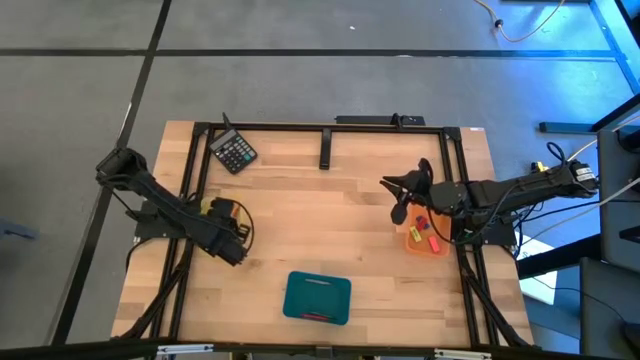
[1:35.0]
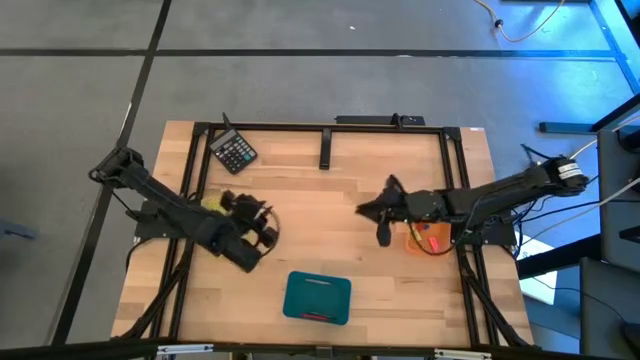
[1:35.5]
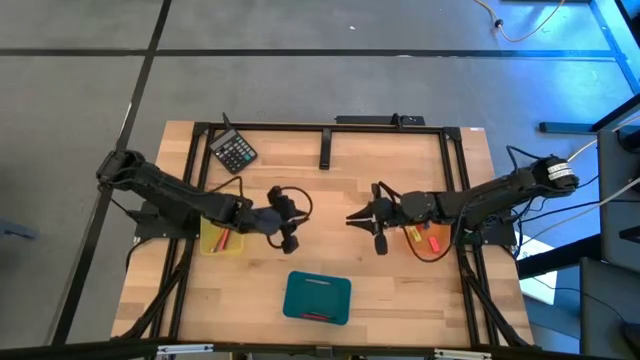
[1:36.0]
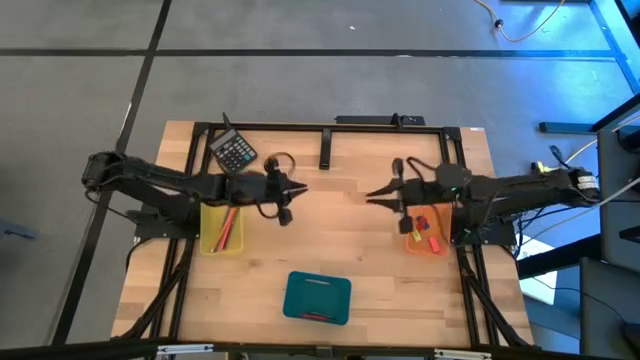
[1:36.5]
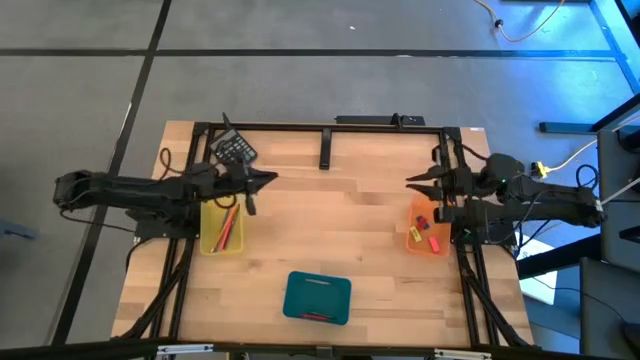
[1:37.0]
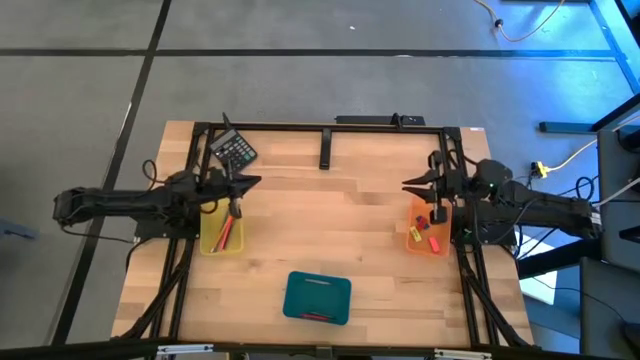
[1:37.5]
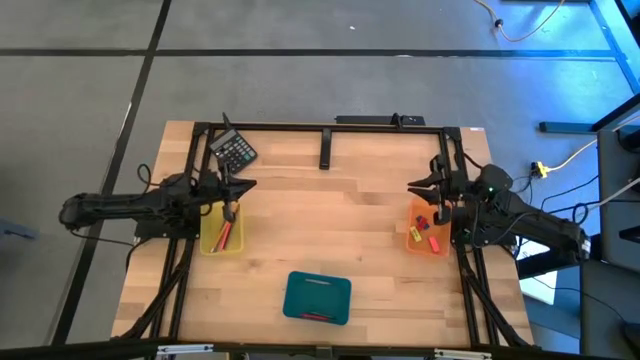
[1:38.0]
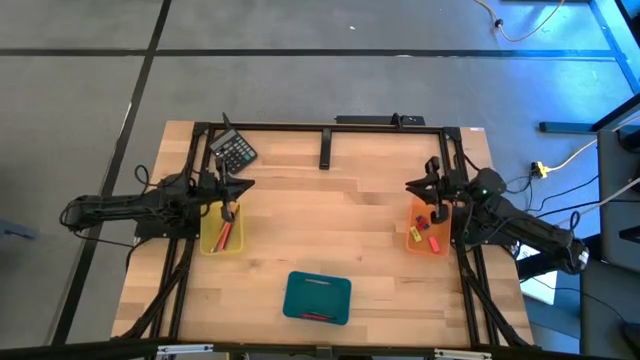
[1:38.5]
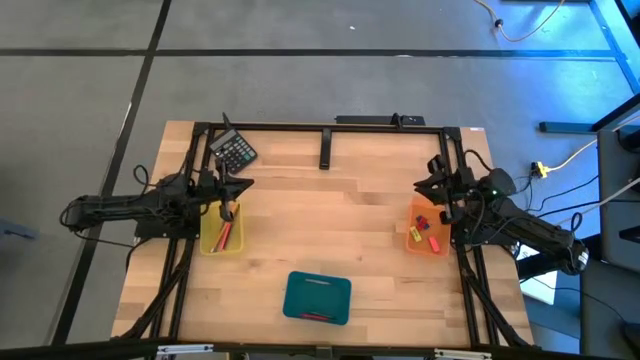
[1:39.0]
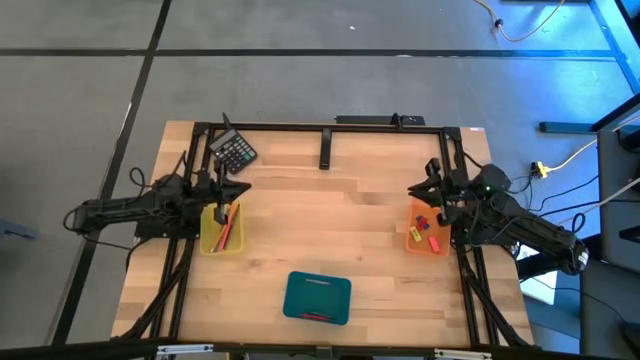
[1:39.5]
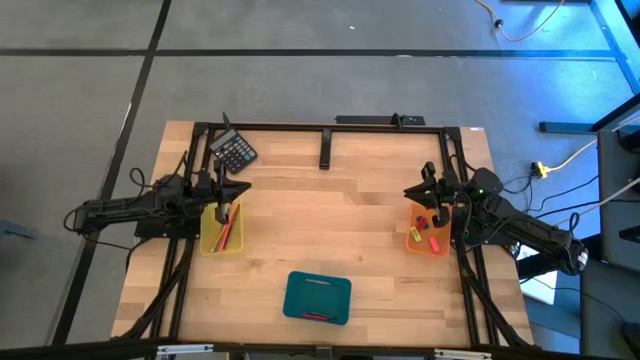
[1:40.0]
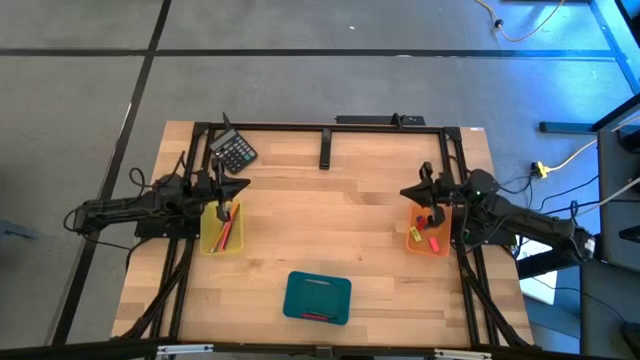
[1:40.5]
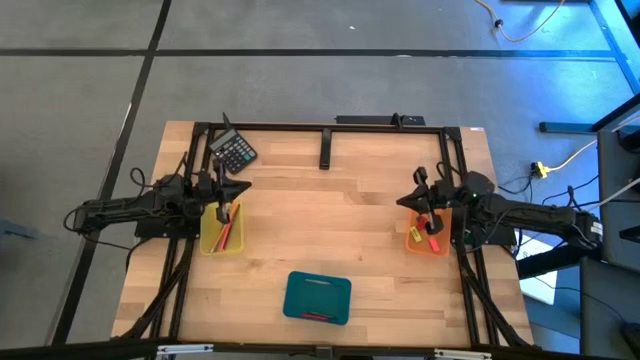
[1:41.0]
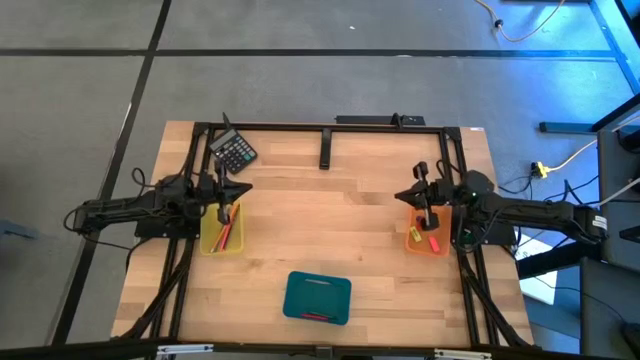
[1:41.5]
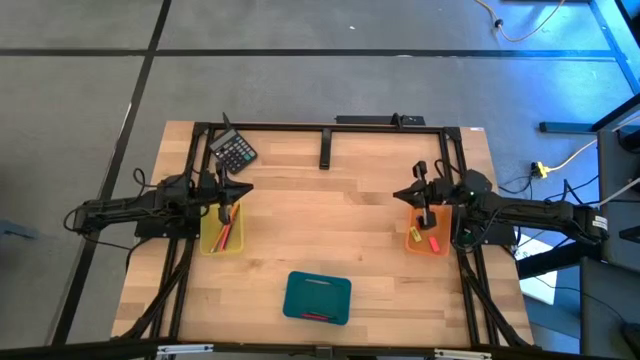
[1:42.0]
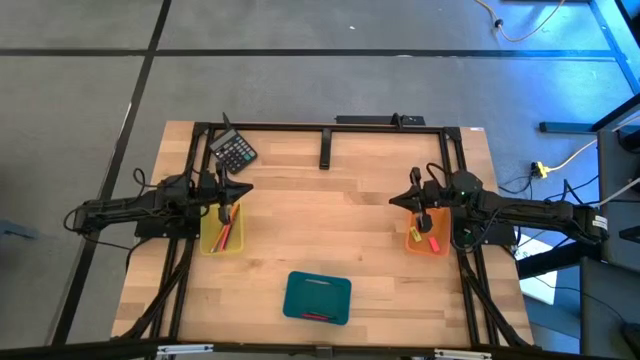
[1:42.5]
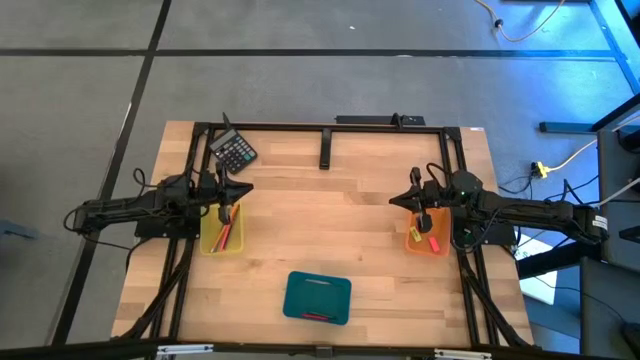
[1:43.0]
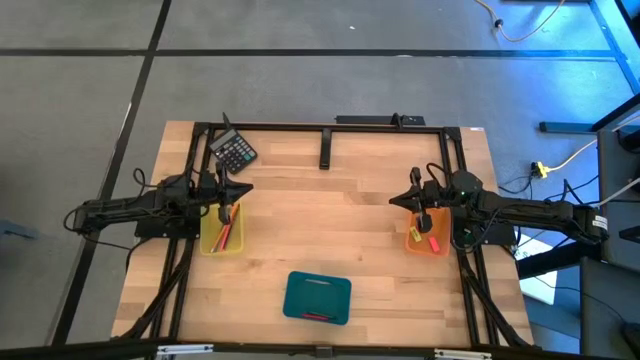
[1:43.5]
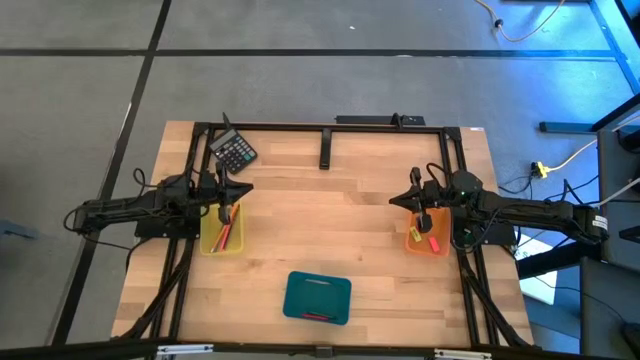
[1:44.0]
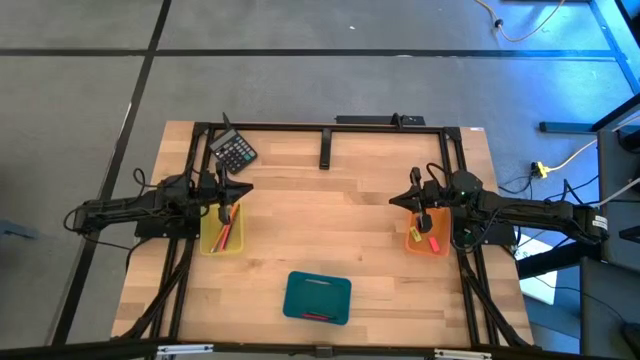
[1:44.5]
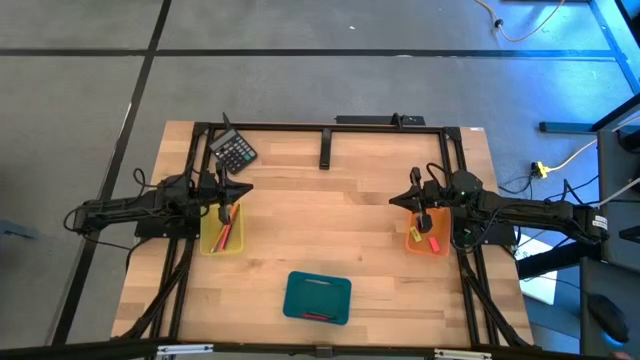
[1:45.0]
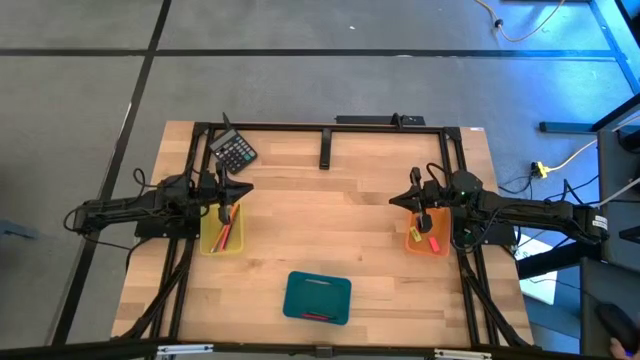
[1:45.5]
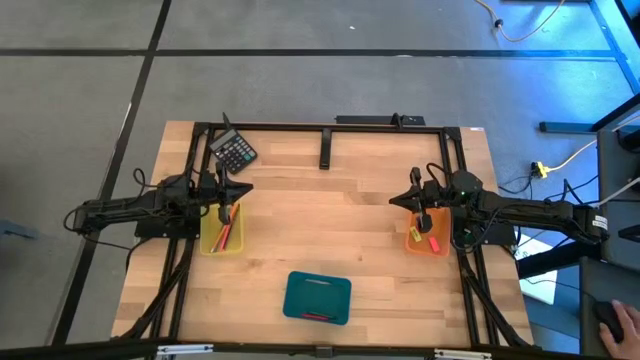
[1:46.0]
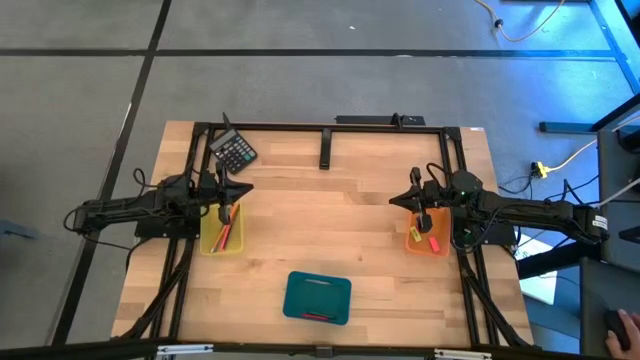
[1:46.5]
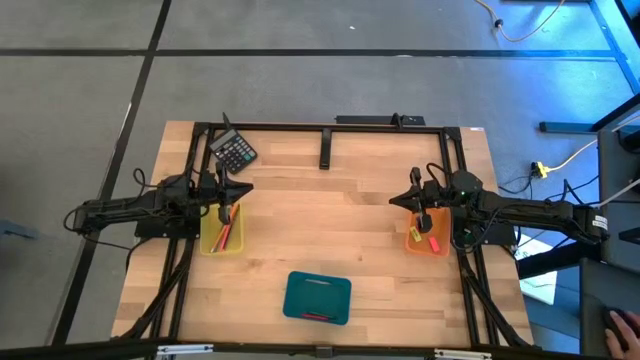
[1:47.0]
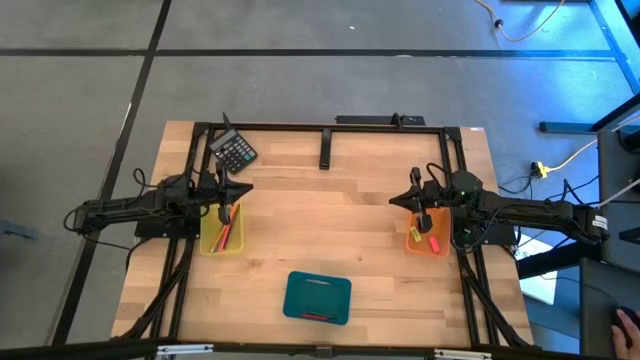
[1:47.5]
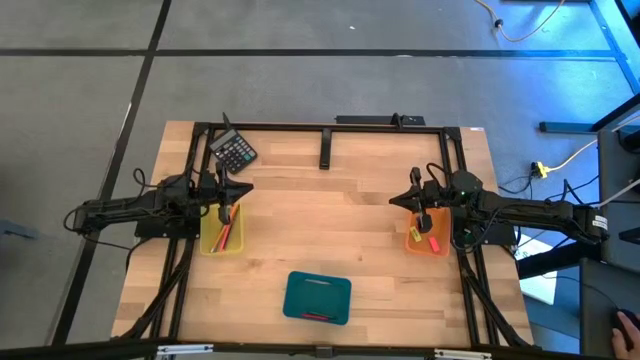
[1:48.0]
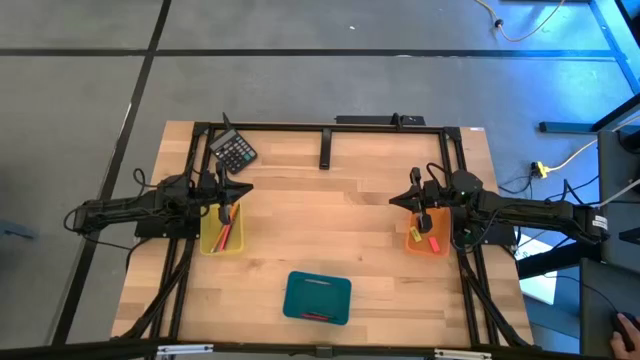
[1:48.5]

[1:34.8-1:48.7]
Task: Sort crayons/erasers/pens/pencils in bins
Return to Home Position

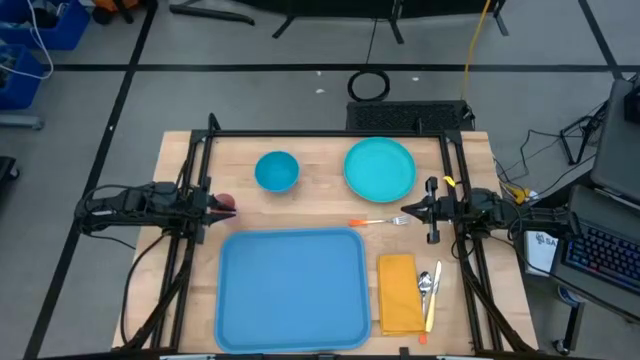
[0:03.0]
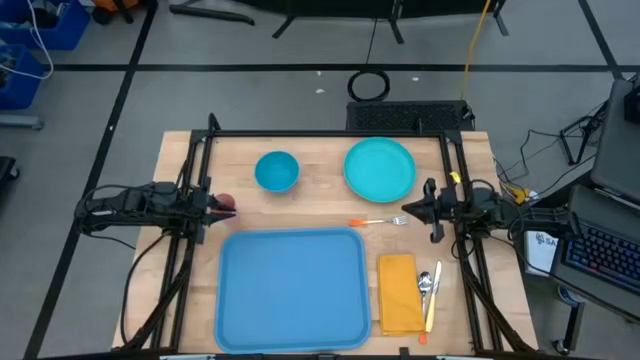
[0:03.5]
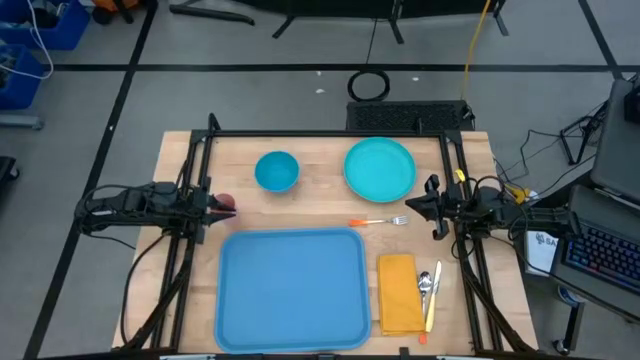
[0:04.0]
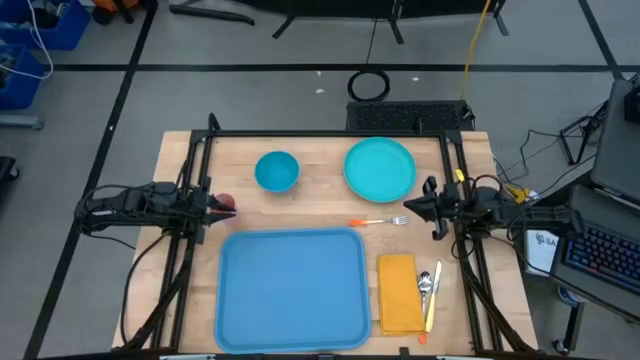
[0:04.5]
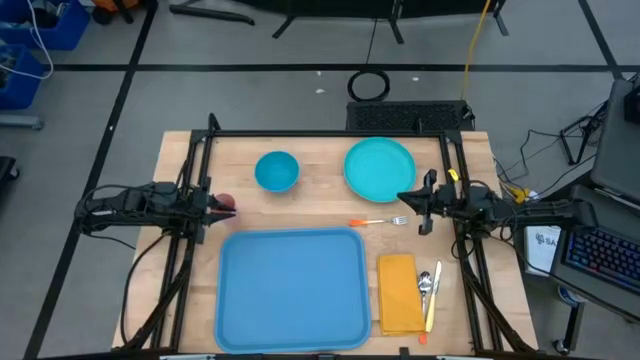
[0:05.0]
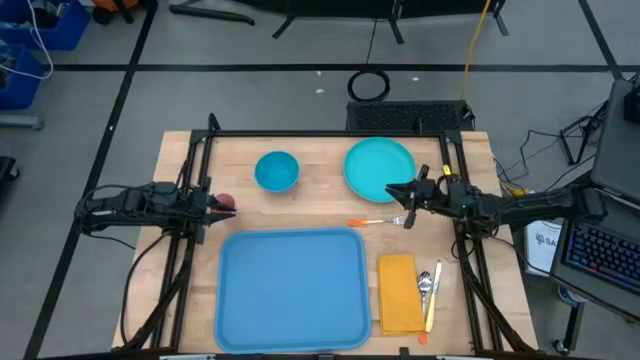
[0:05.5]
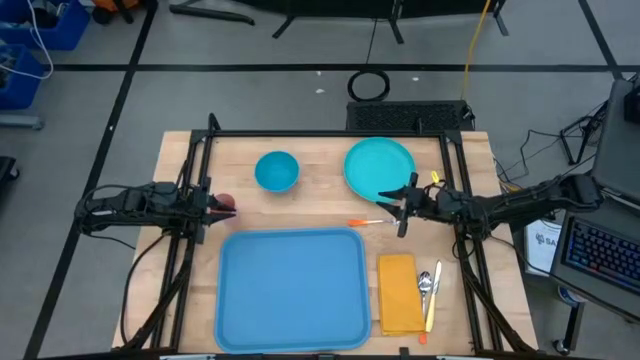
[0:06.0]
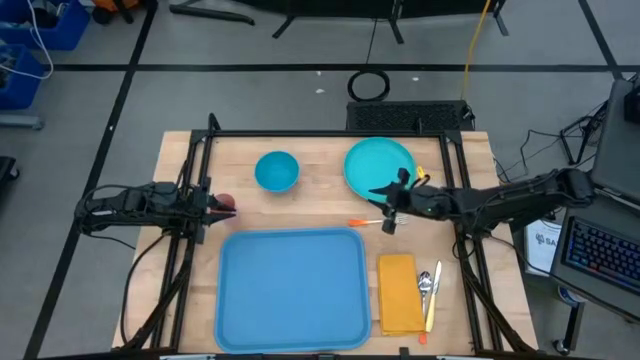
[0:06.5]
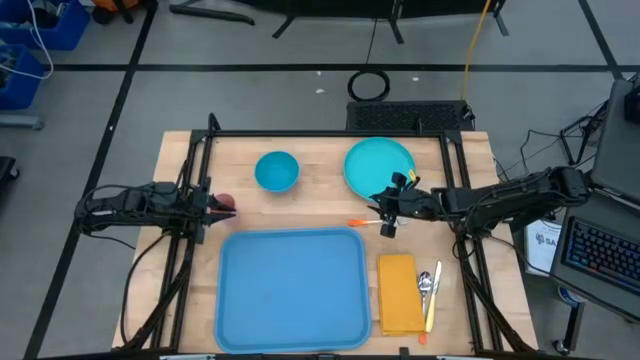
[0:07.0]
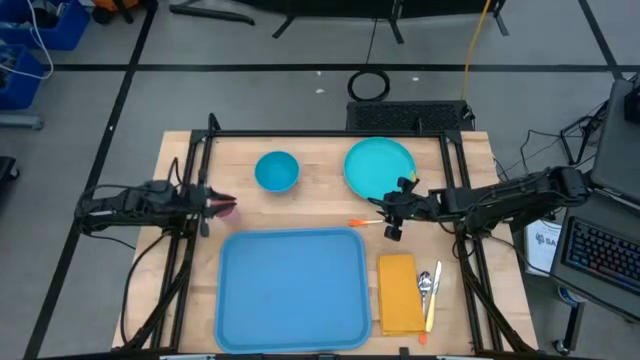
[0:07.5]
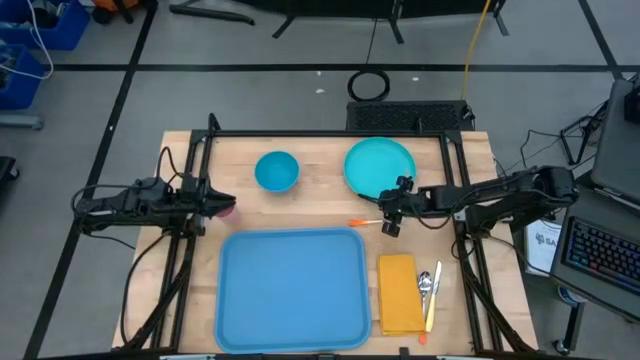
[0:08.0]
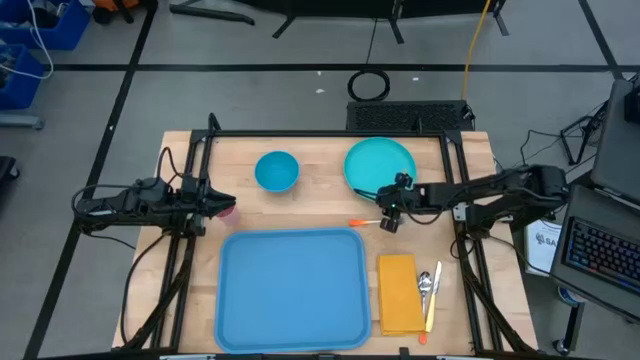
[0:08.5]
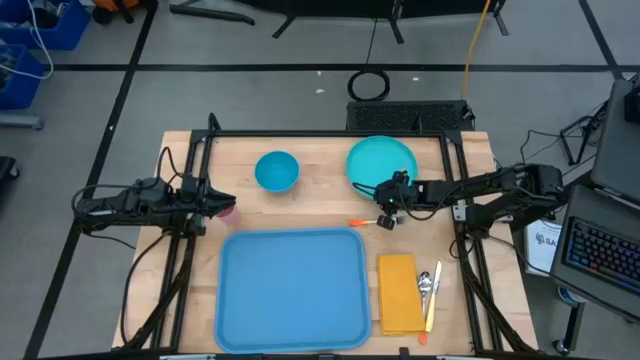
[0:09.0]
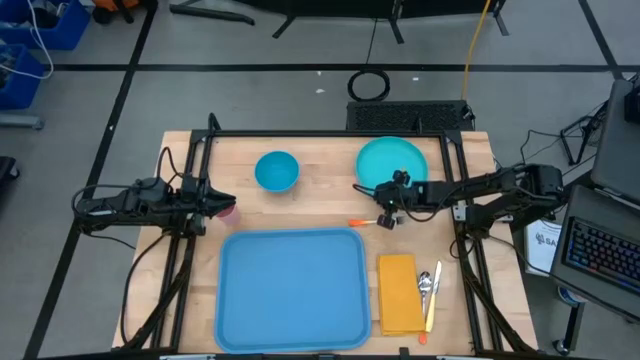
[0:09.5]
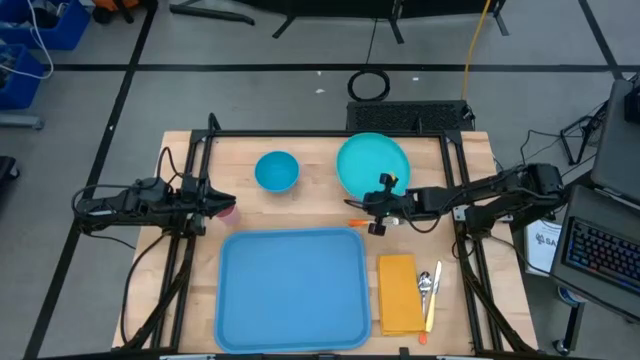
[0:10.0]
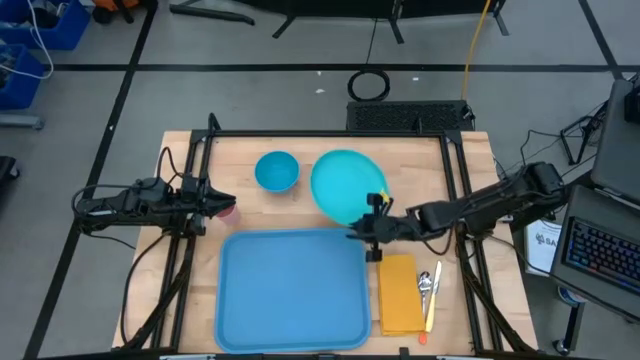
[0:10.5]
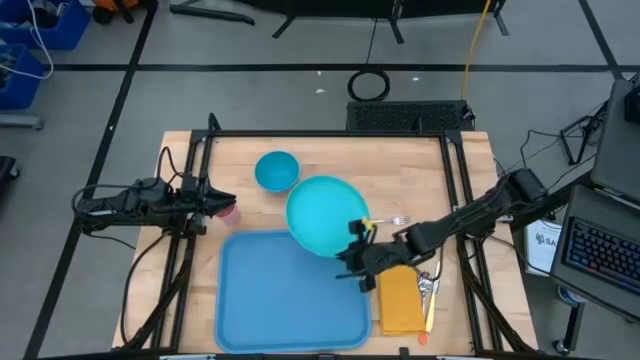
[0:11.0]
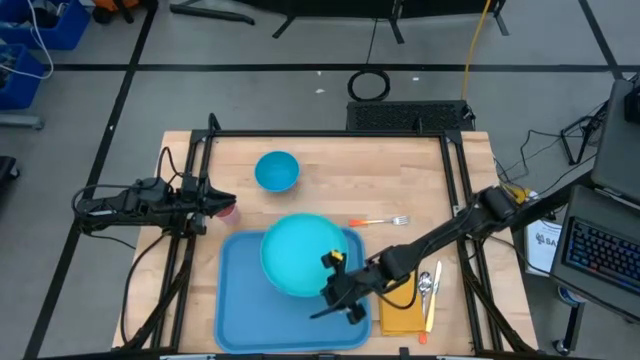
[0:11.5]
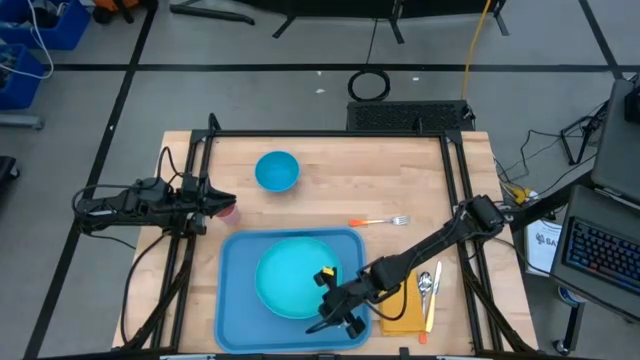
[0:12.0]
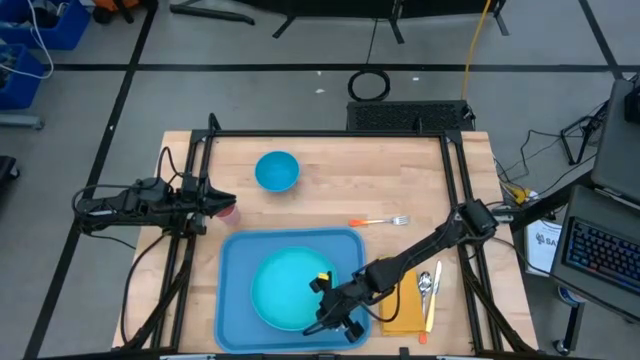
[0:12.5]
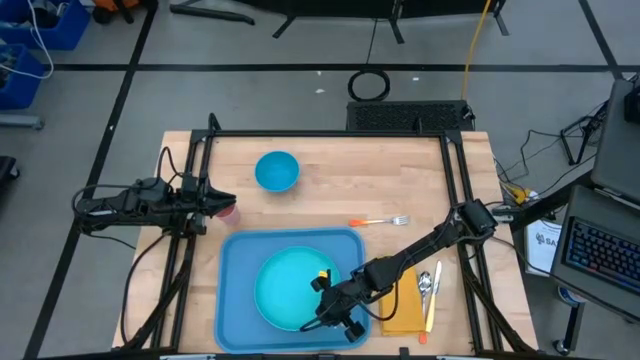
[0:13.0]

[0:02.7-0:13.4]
Task: Set up tray
Put the light blue plate on the serving tray
